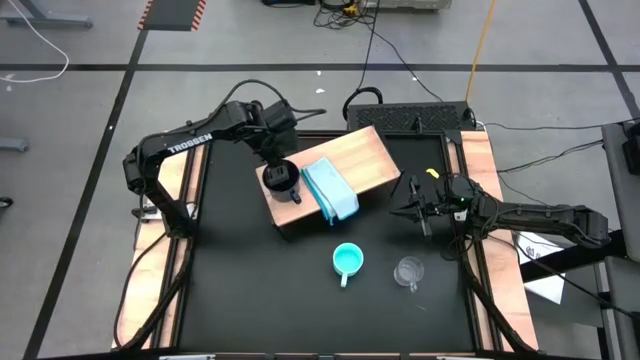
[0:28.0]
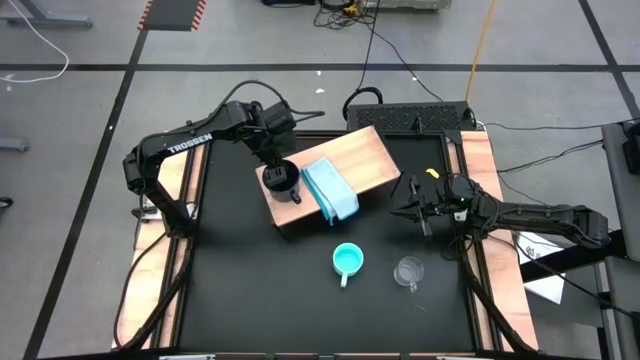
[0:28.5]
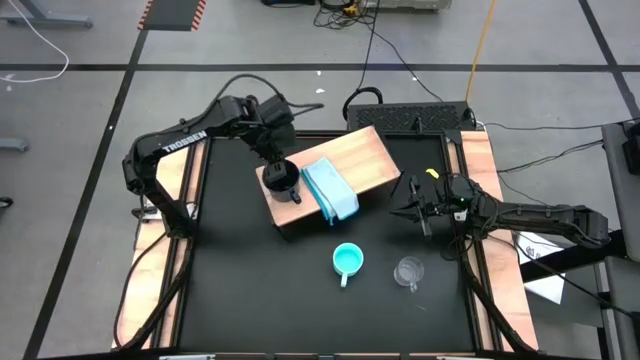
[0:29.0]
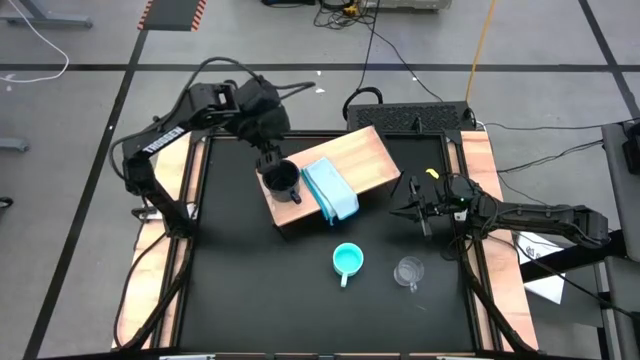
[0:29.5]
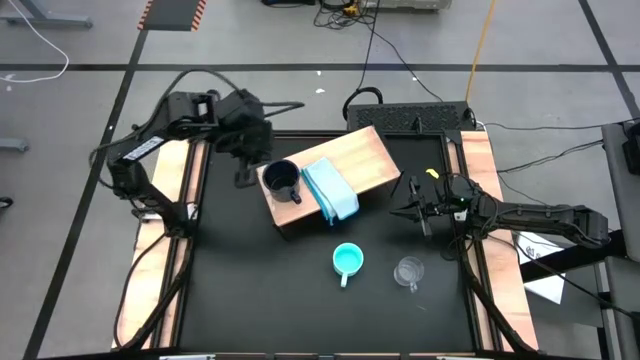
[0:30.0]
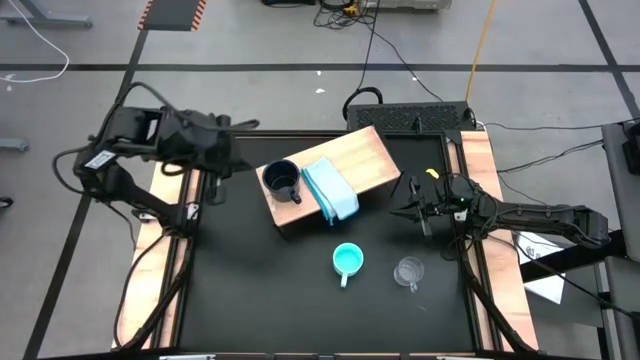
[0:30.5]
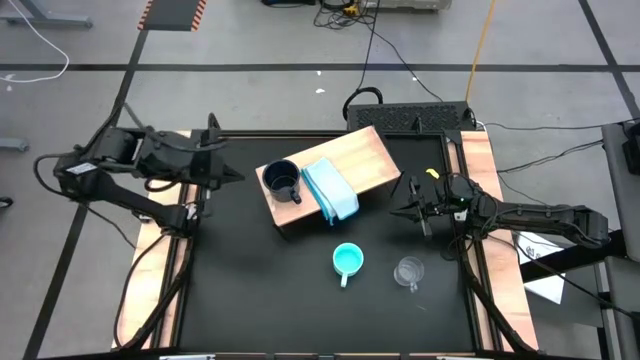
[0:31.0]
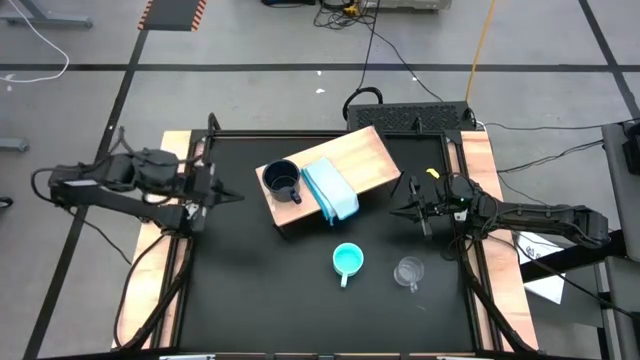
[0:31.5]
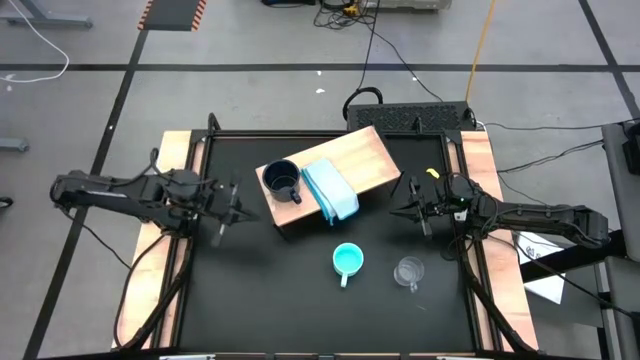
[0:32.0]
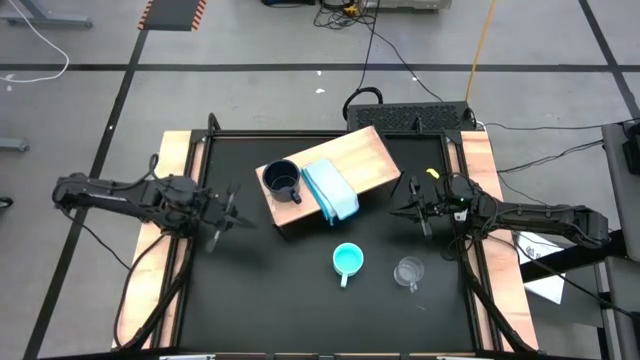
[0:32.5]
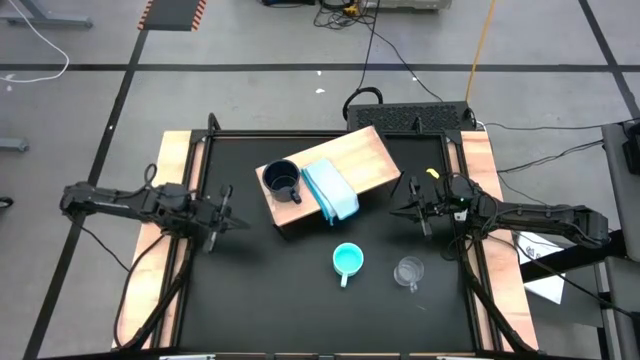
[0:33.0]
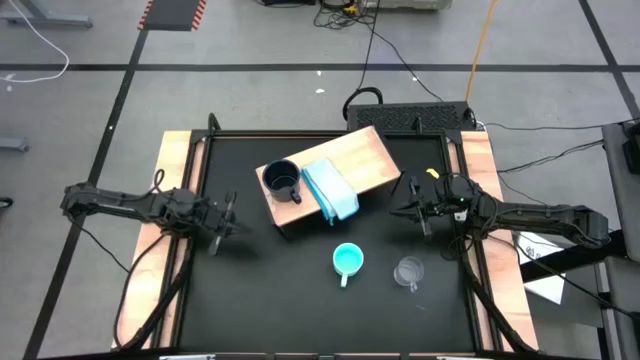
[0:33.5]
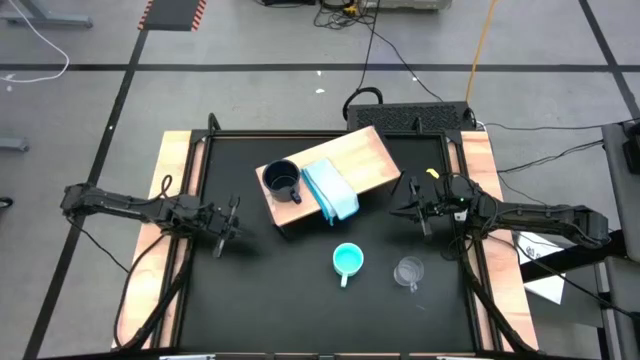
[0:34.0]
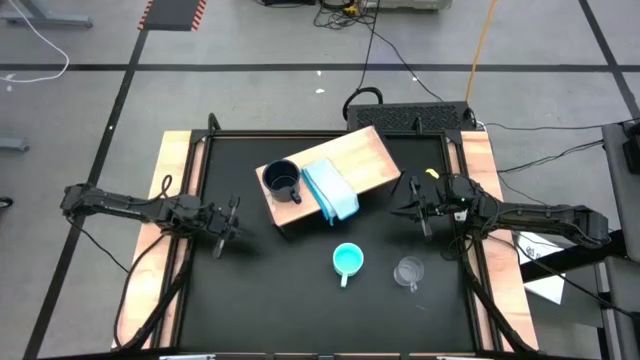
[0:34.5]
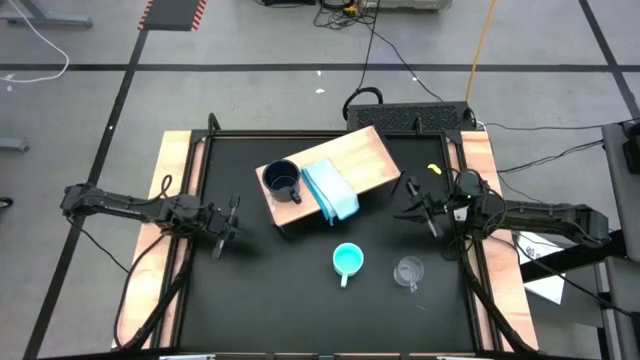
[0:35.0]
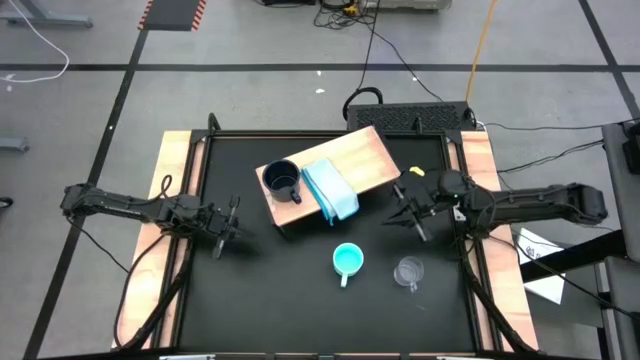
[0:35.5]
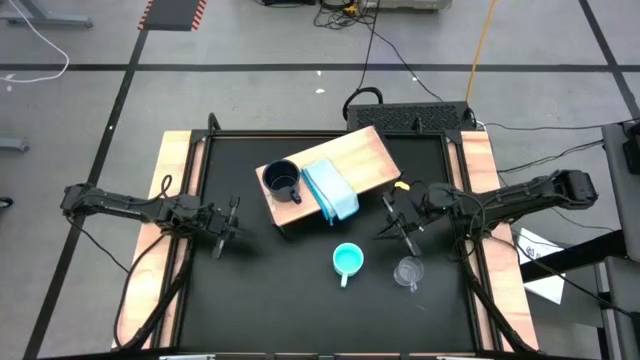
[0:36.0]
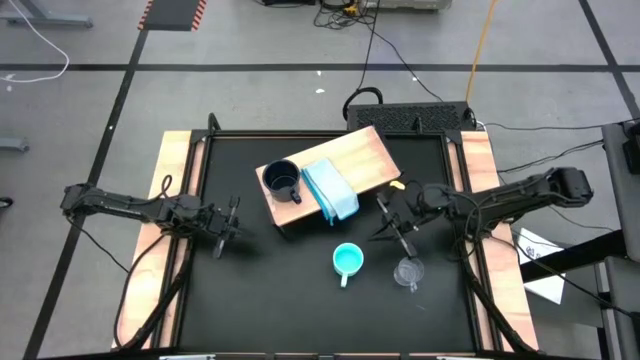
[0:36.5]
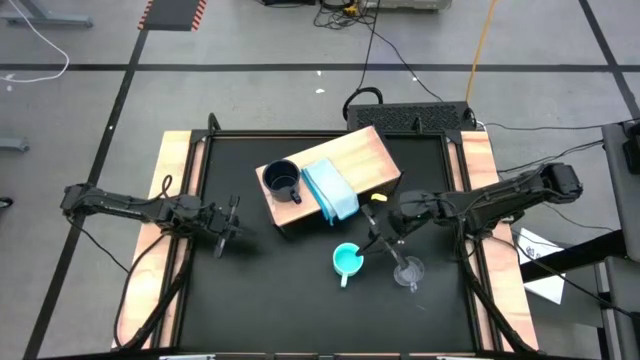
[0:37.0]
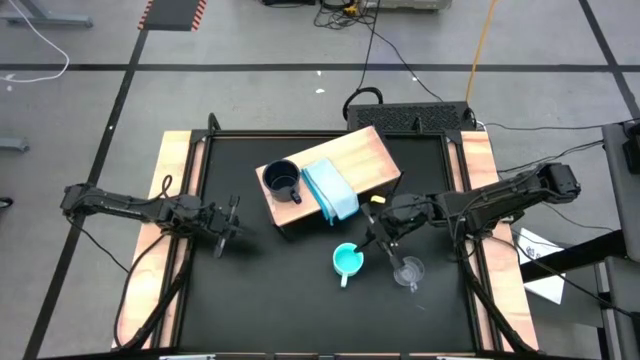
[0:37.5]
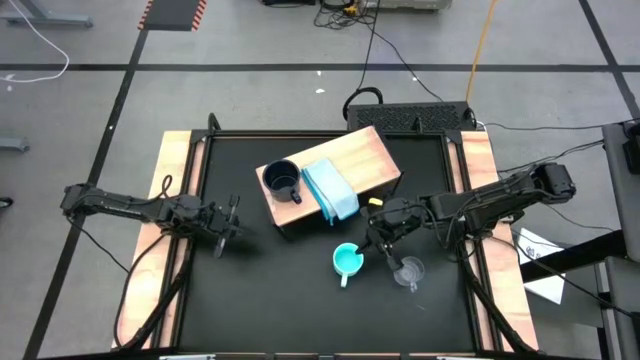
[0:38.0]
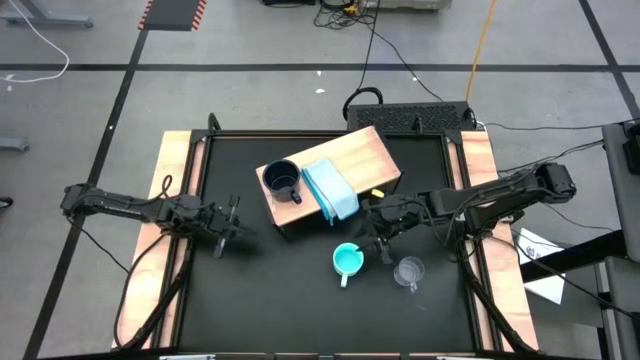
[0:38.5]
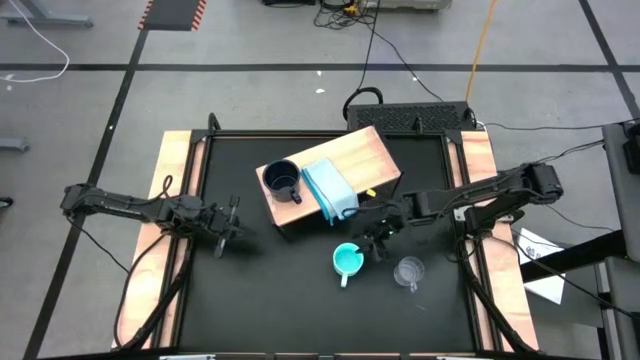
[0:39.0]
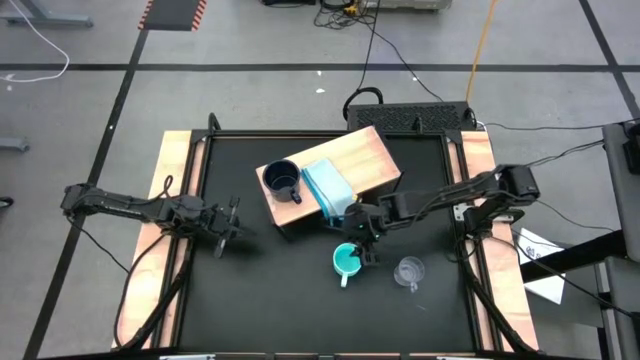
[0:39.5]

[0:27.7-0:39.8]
Task: Stack small to large cups/mugs on shelf
Put the light blue mug over the folded light blue napkin on the shelf

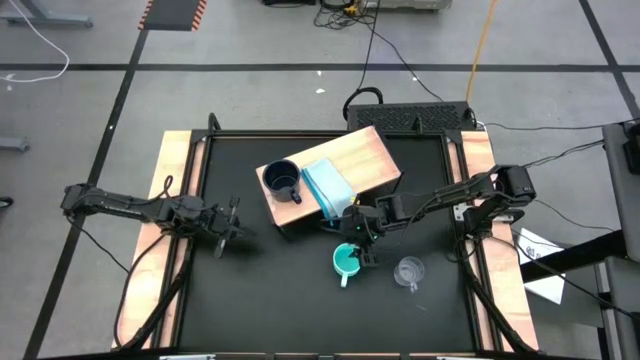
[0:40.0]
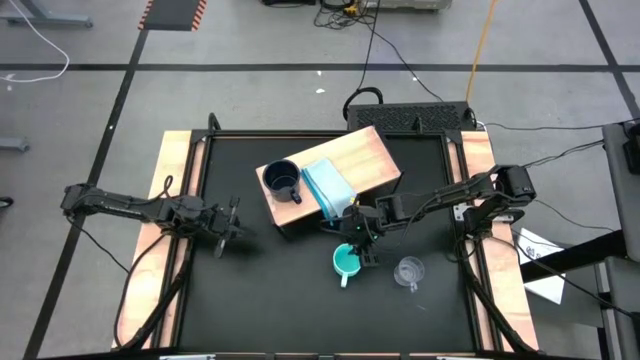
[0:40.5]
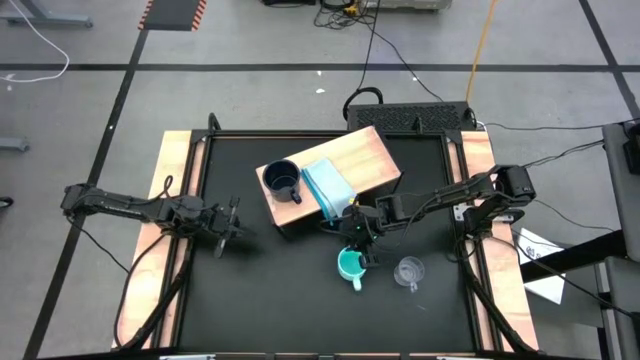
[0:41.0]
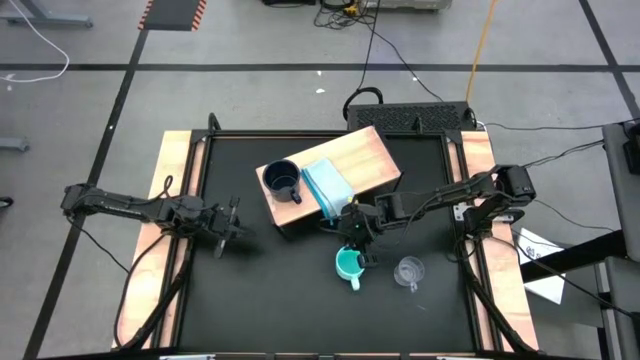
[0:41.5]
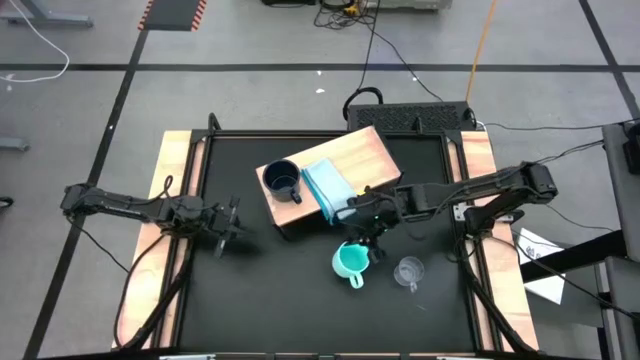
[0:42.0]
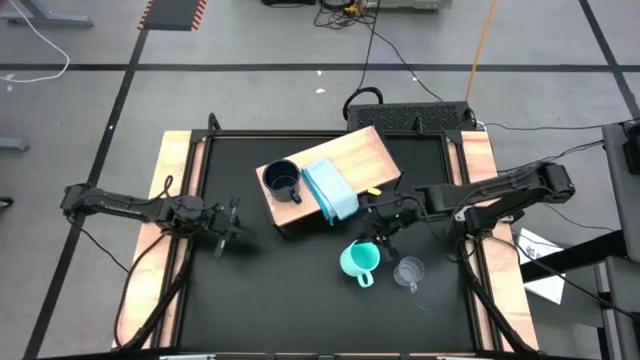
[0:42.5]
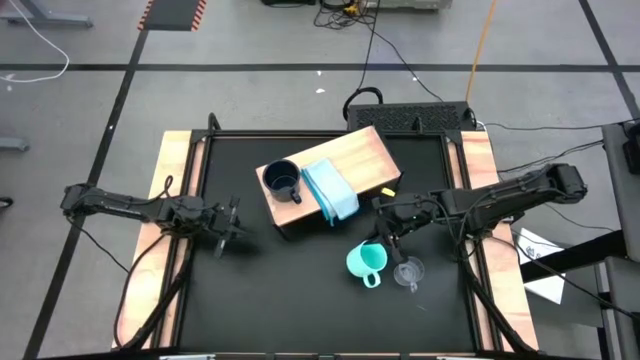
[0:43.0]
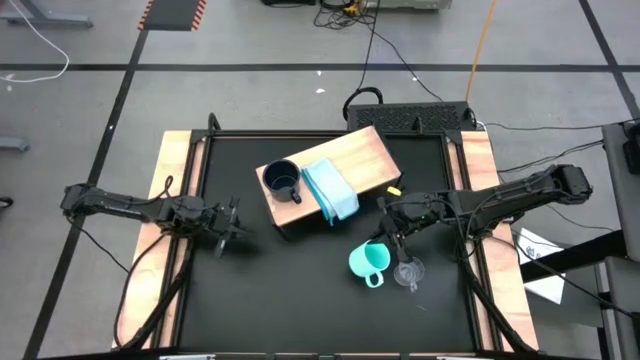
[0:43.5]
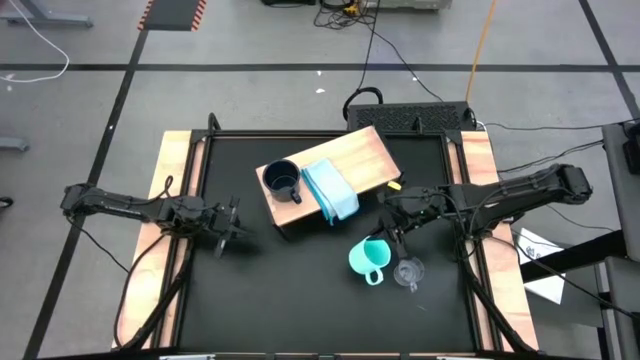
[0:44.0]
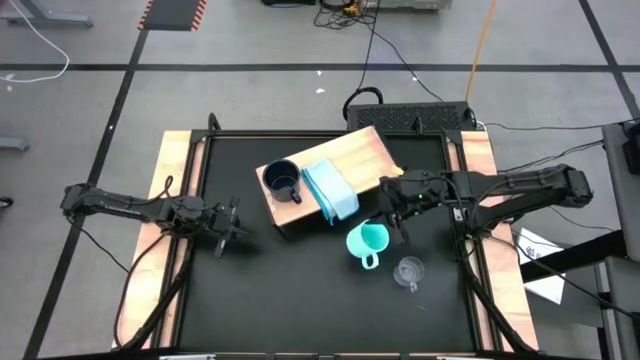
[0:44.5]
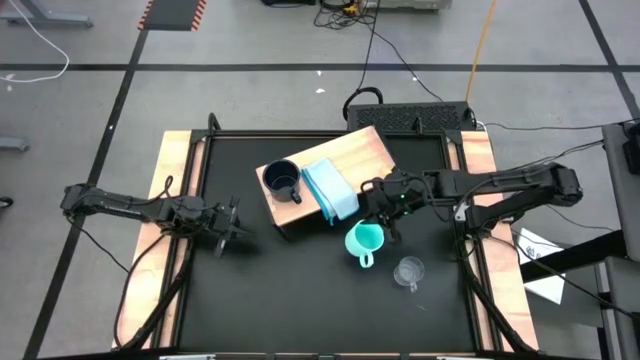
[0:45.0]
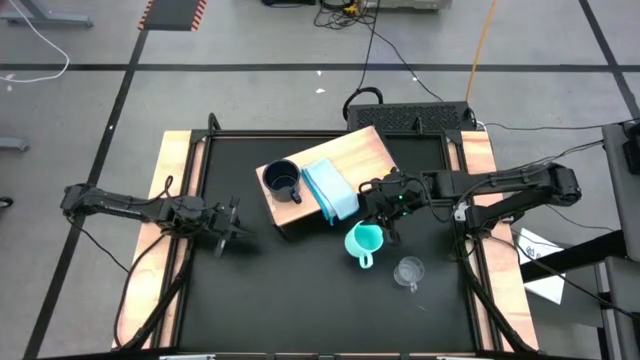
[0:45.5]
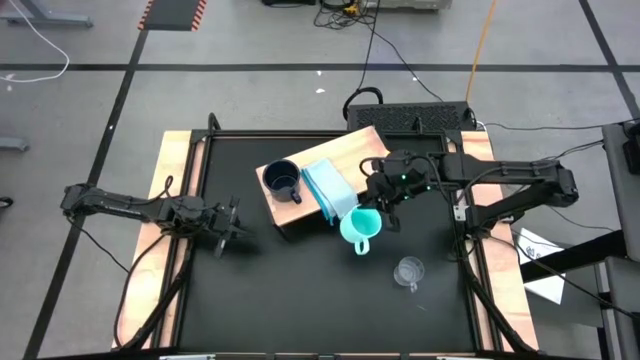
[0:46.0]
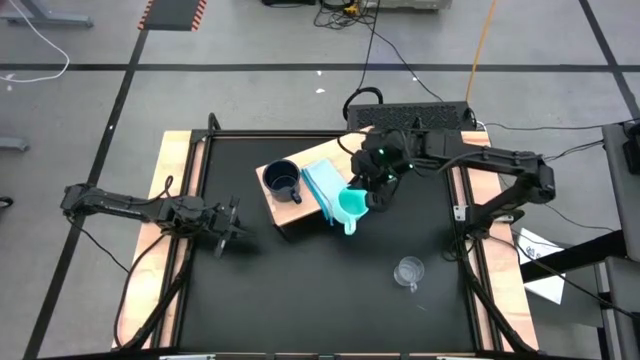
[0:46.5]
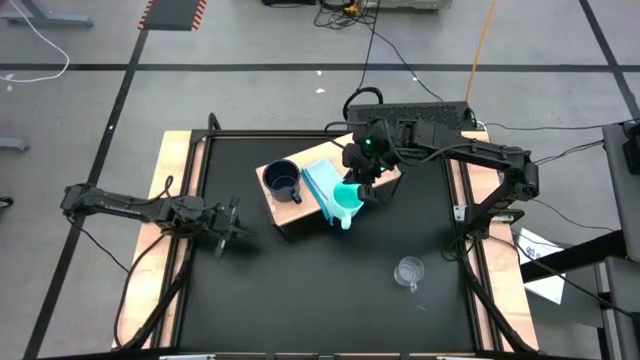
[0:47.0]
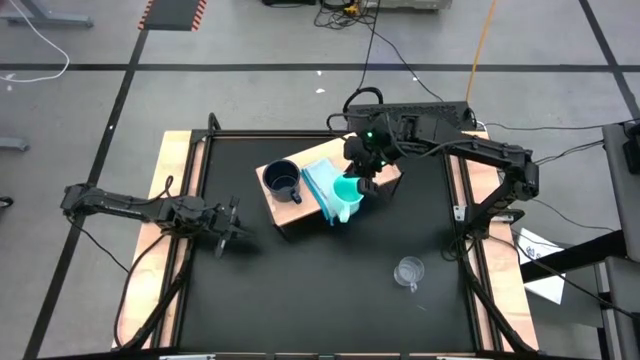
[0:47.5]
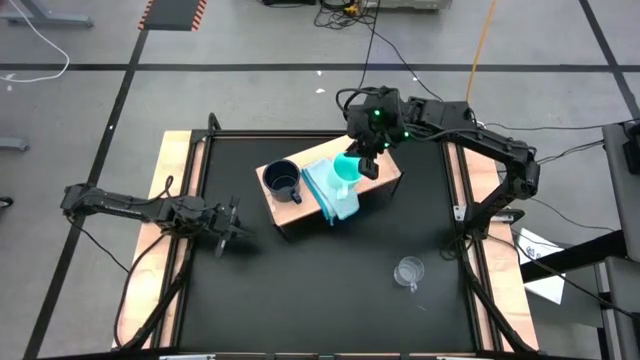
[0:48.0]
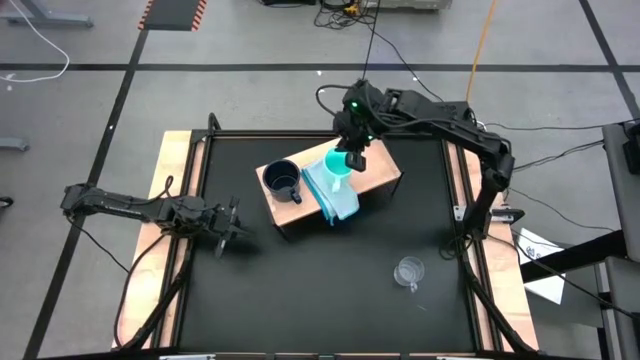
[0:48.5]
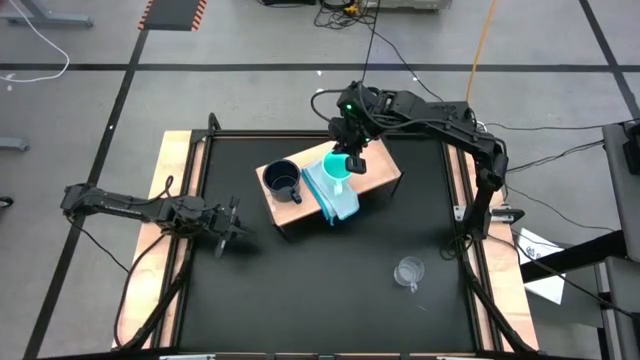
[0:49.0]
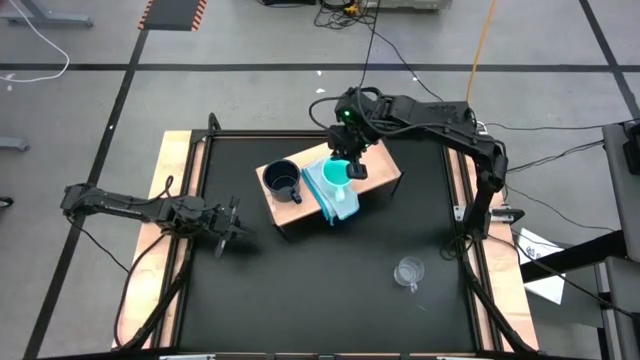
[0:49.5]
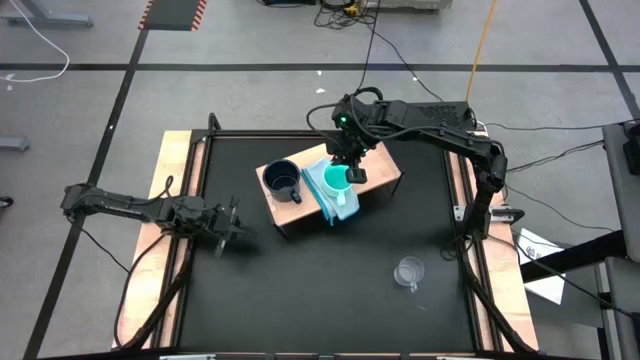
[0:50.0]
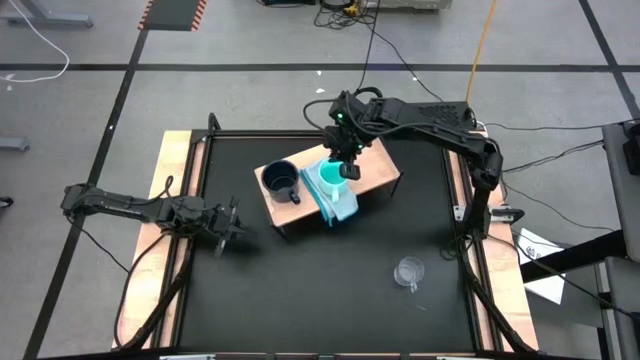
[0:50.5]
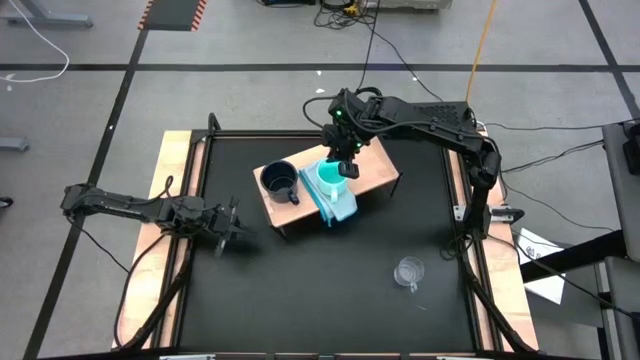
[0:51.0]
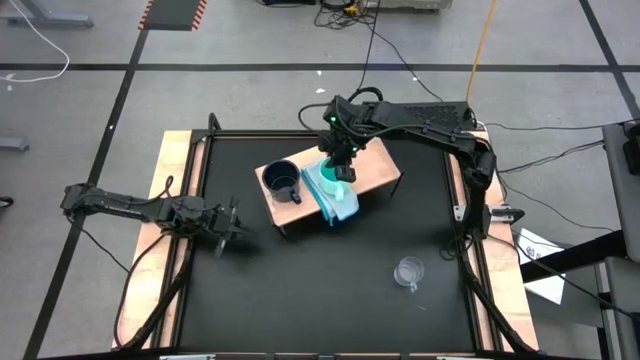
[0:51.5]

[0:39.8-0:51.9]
Put the light blue mug over the folded light blue napkin on the shelf
